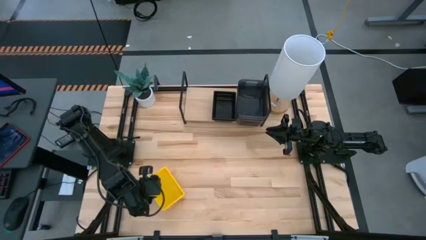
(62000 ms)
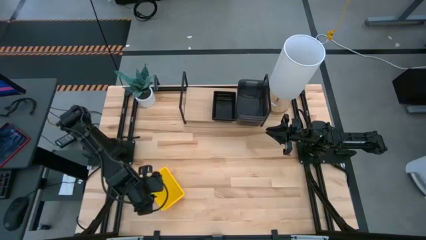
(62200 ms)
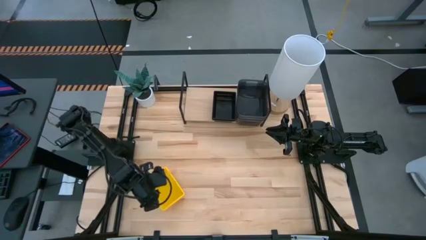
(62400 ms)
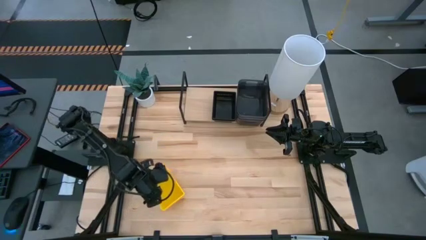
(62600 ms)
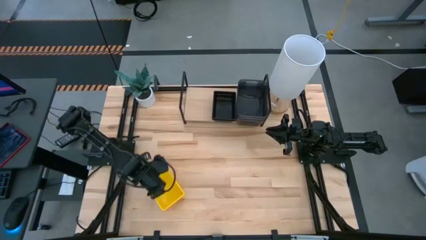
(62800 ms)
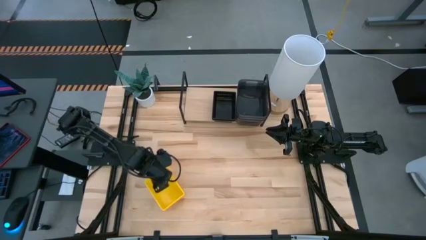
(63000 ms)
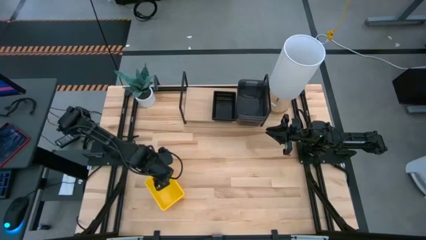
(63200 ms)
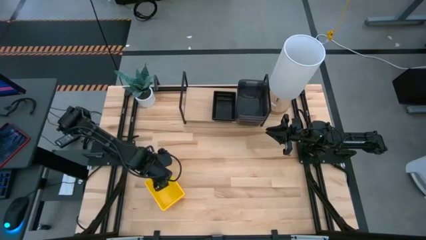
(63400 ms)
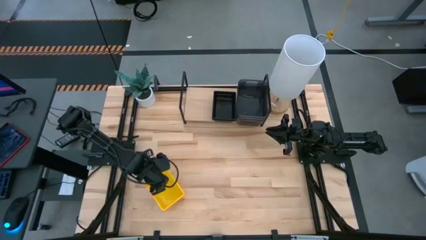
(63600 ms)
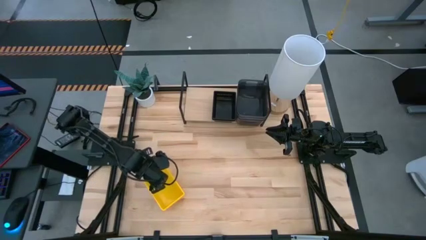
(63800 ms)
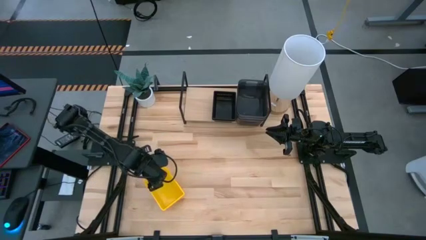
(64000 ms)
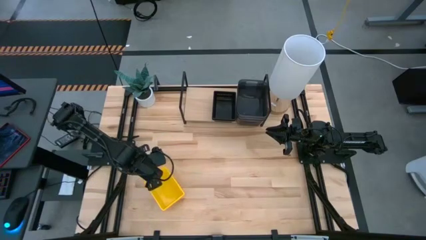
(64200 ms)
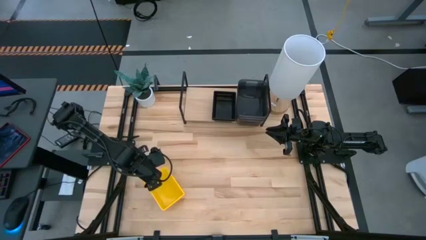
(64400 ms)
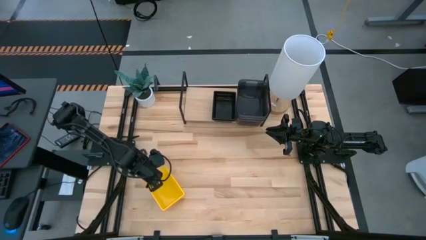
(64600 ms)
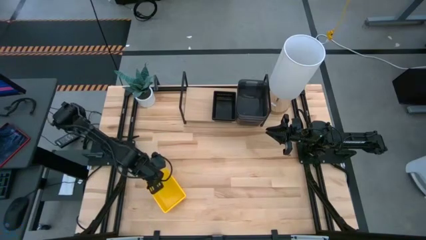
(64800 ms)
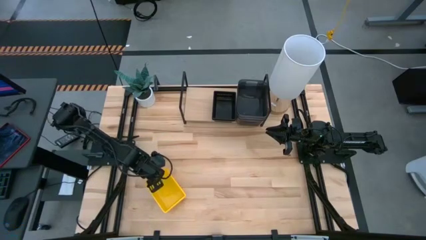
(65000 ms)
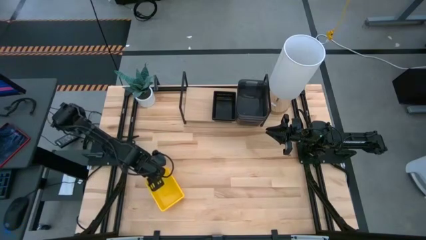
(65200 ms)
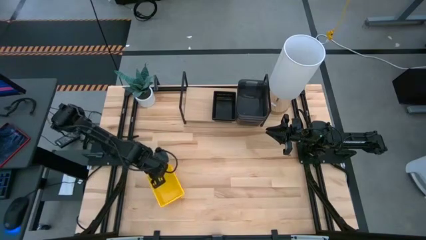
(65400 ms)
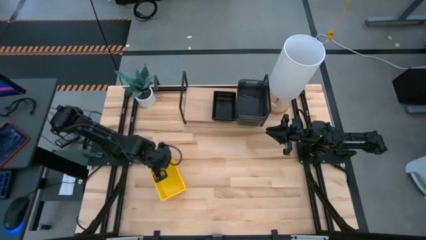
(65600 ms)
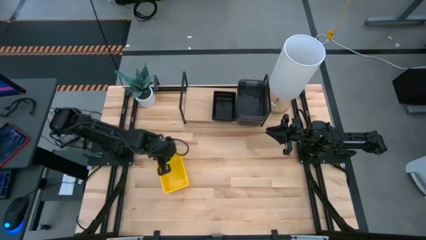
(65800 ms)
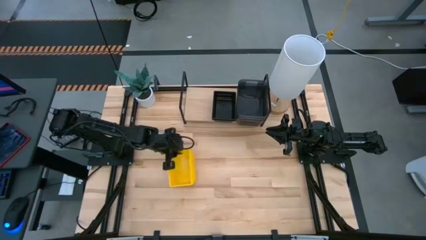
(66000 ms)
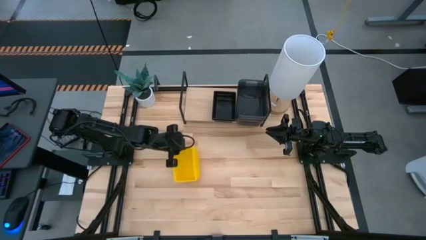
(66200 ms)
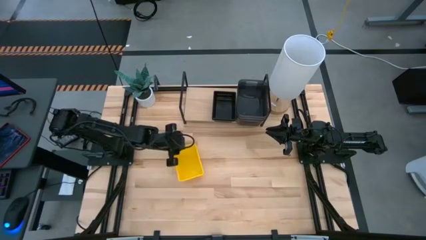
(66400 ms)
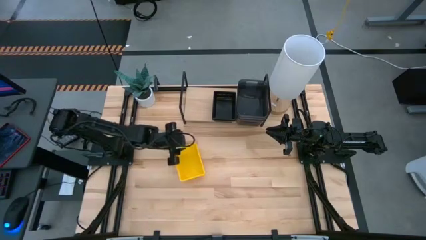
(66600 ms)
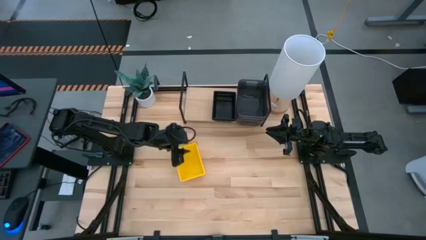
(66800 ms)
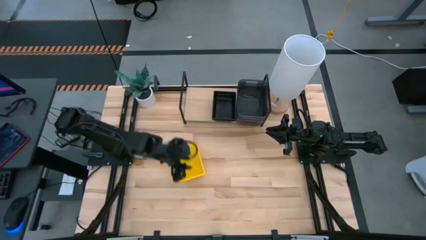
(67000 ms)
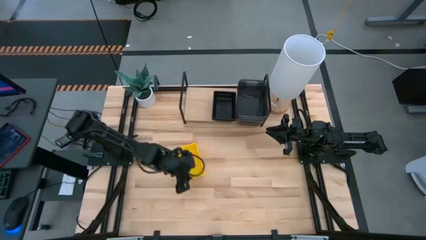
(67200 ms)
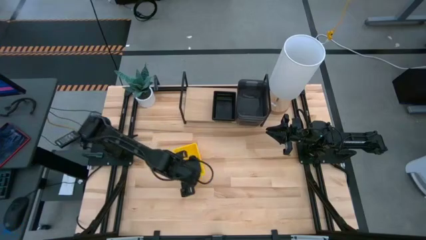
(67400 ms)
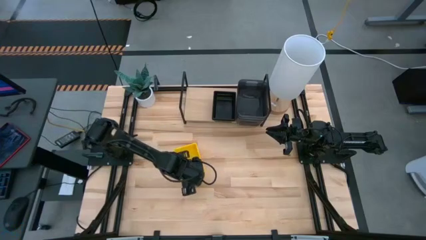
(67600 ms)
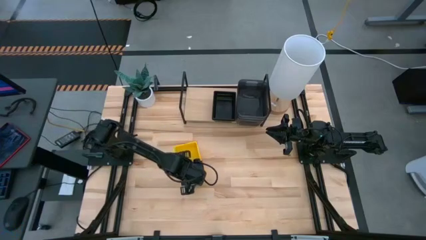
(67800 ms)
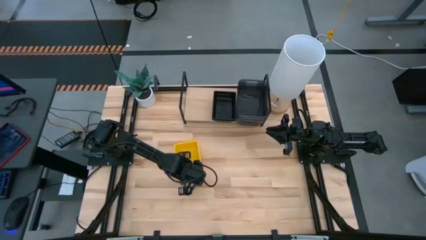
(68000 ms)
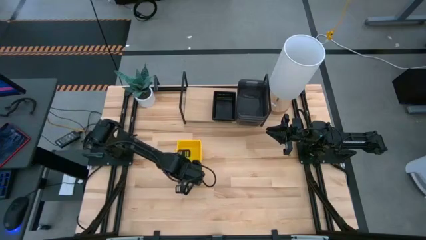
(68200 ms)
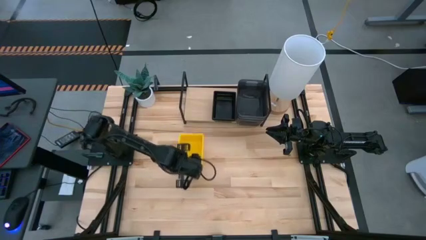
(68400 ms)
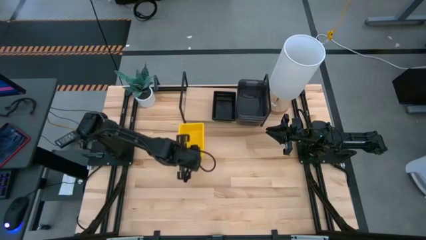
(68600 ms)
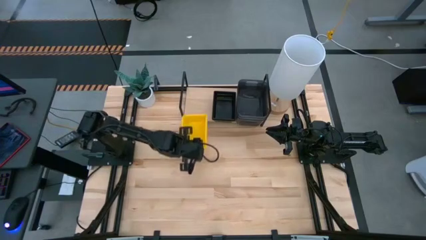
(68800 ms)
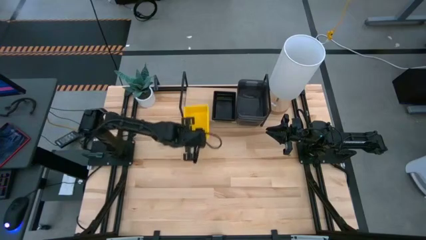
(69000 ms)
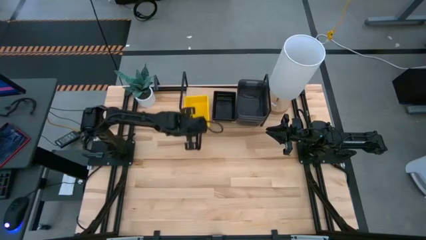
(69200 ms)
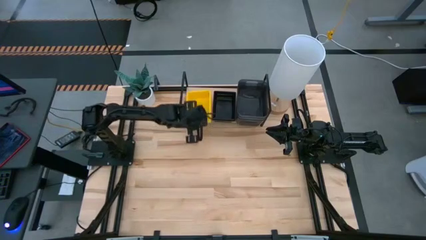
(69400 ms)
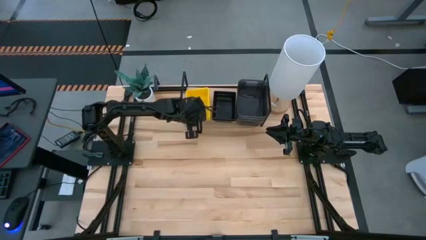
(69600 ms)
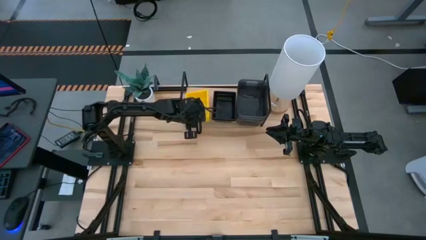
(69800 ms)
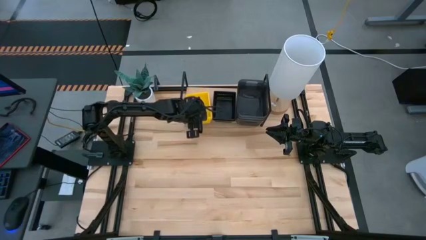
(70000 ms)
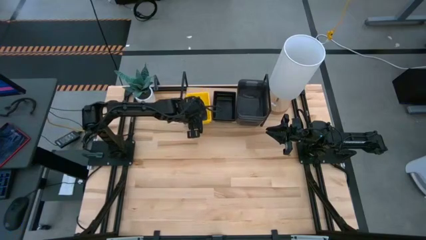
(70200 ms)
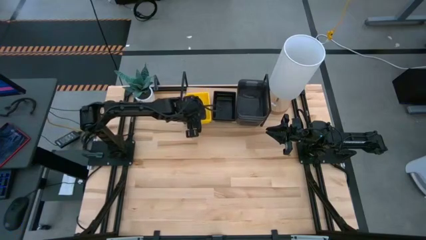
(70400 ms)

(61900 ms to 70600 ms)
Task: Stack baskets on shelf by color
Put the stacked yellow bins on the shelf

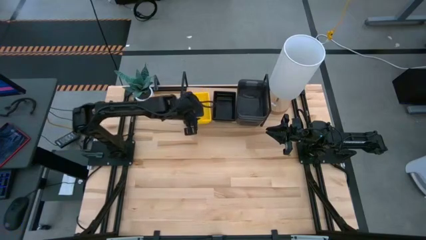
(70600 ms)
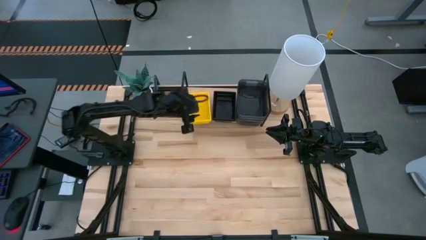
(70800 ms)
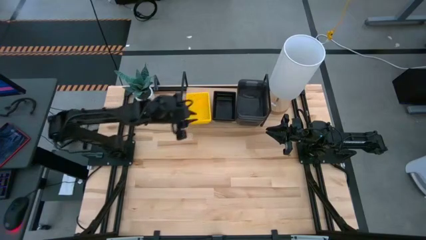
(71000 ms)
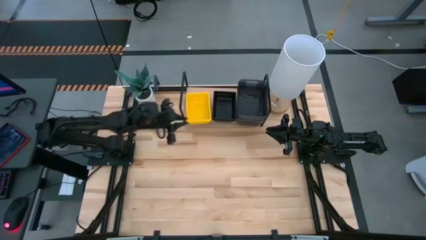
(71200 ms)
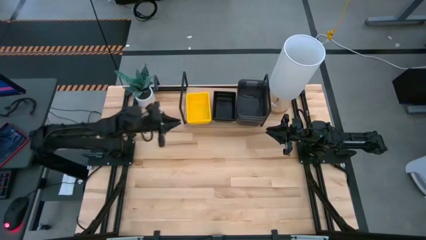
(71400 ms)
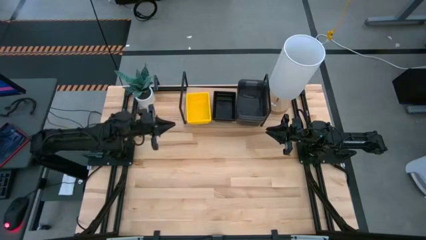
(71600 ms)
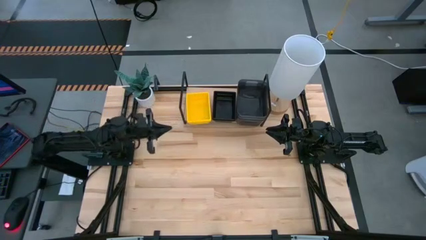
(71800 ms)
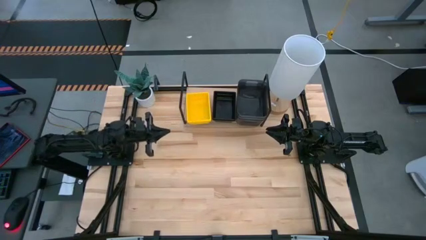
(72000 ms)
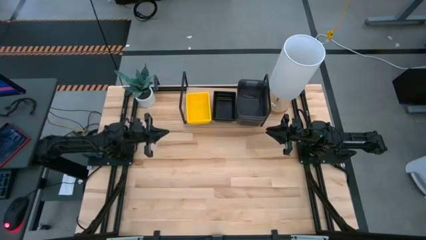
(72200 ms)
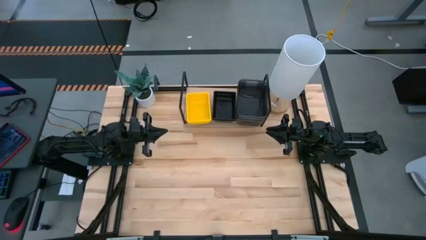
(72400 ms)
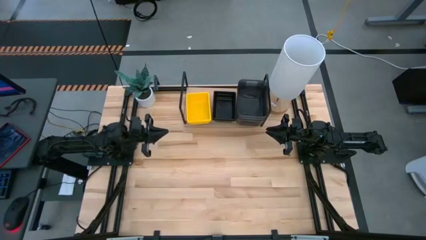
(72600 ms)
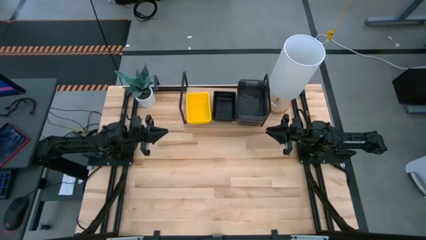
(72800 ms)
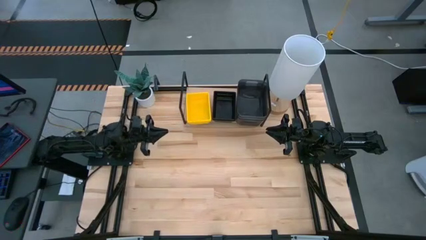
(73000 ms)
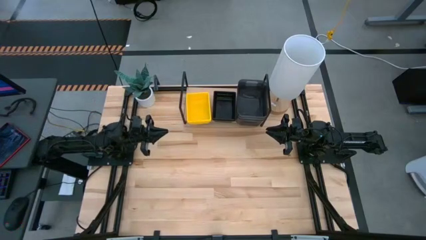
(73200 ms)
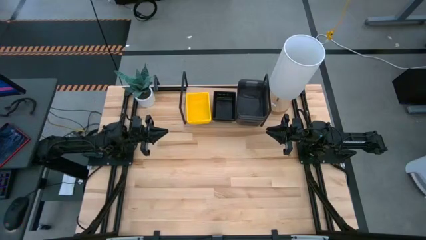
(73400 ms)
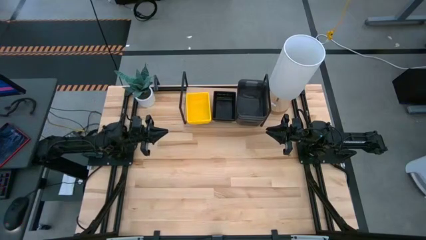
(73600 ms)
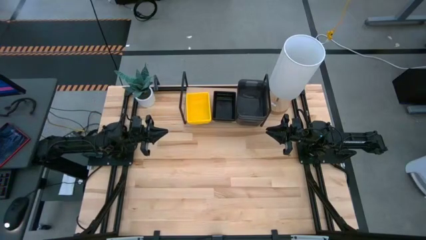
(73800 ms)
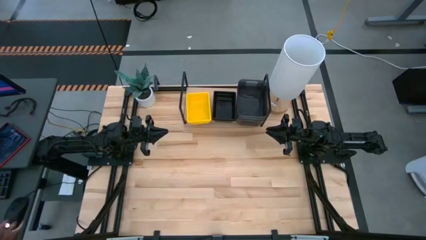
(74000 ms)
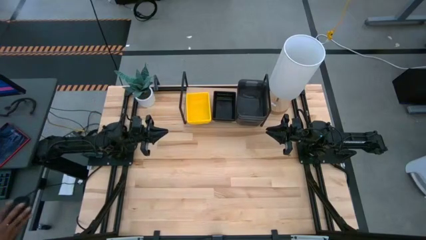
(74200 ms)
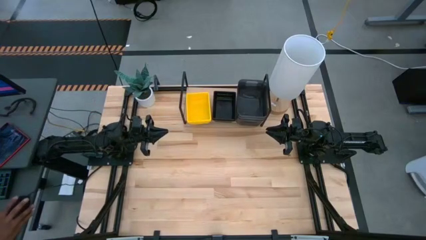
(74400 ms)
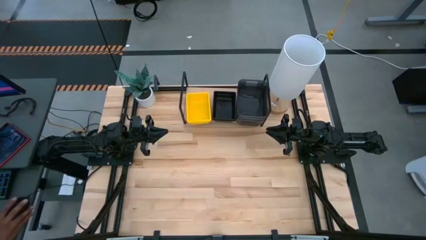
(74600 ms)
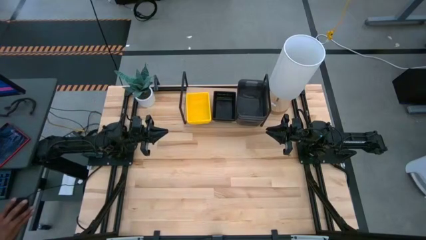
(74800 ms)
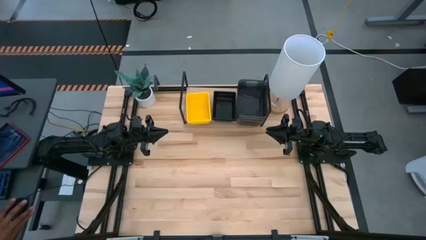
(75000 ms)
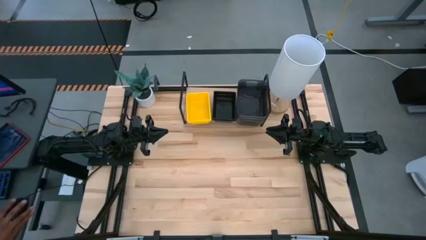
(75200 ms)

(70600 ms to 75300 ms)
Return to Home Position

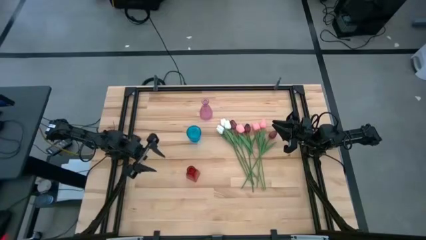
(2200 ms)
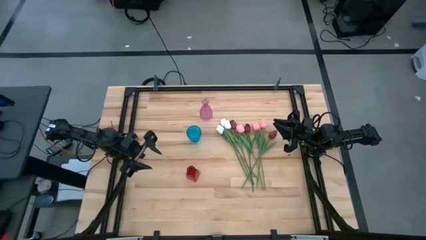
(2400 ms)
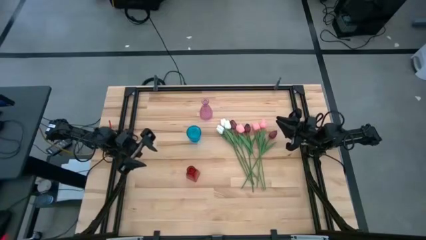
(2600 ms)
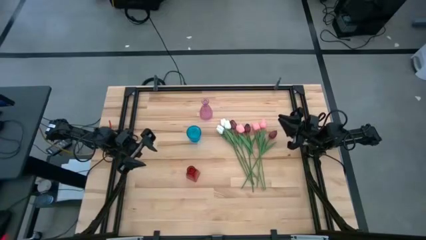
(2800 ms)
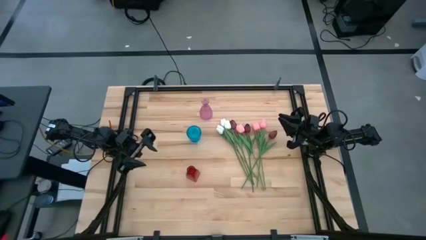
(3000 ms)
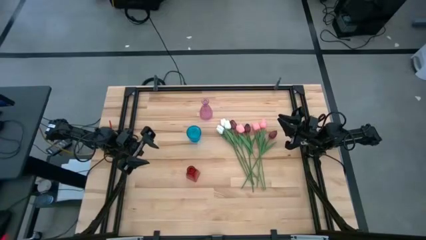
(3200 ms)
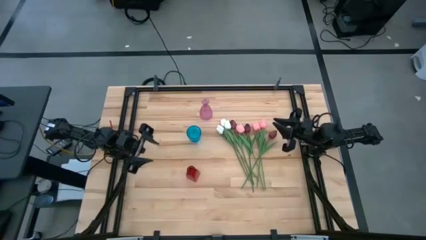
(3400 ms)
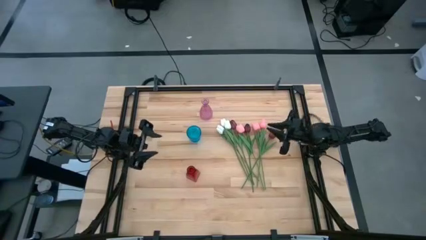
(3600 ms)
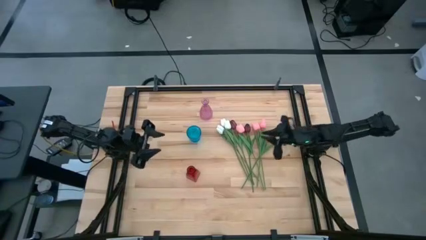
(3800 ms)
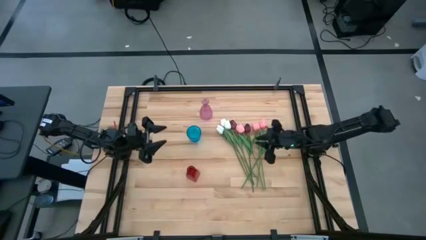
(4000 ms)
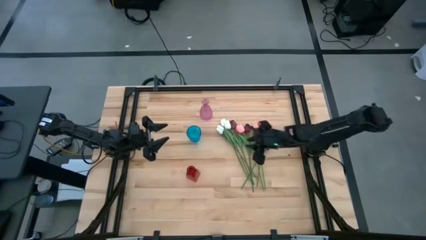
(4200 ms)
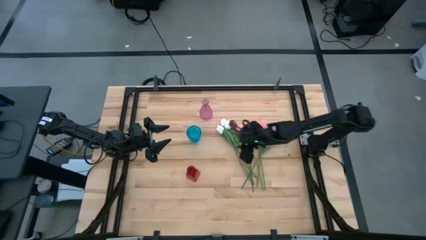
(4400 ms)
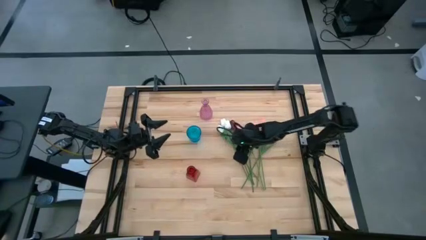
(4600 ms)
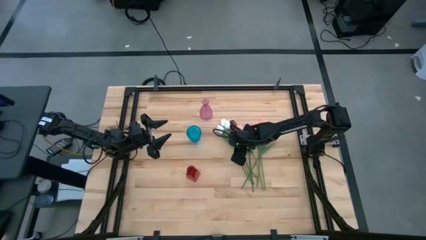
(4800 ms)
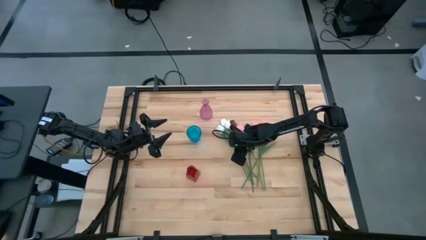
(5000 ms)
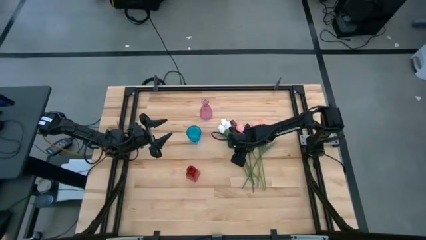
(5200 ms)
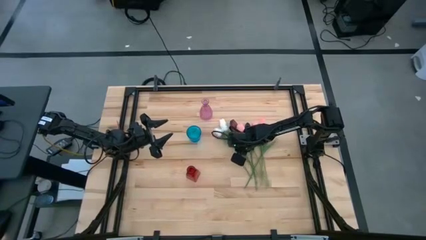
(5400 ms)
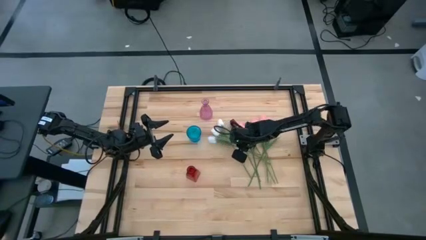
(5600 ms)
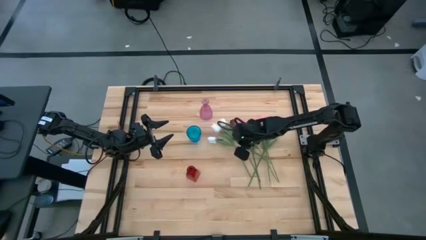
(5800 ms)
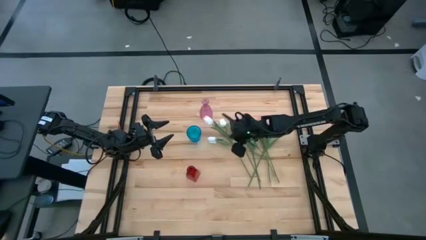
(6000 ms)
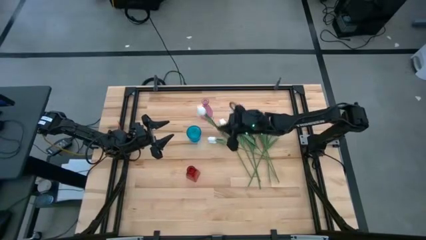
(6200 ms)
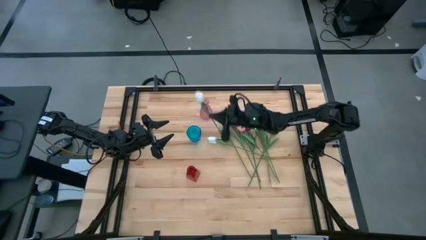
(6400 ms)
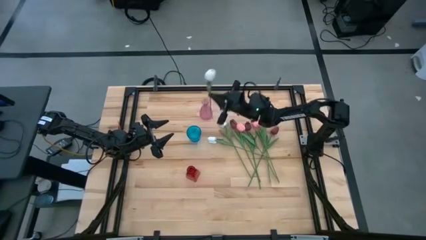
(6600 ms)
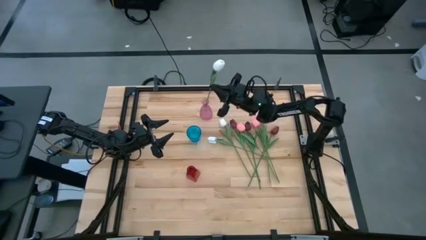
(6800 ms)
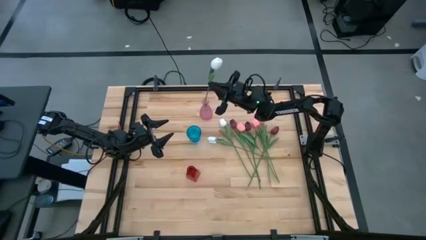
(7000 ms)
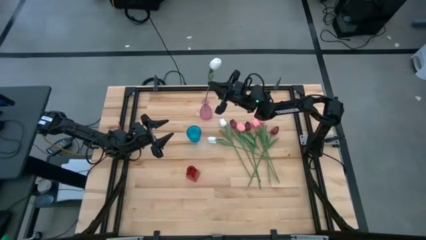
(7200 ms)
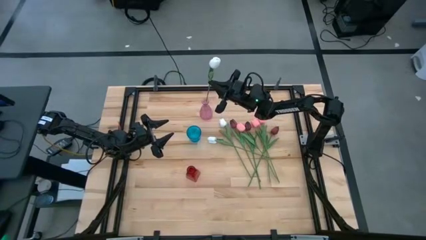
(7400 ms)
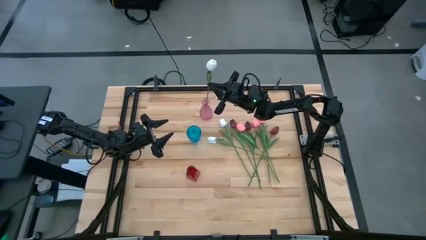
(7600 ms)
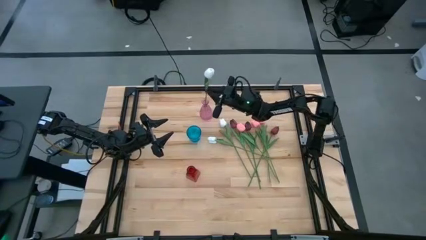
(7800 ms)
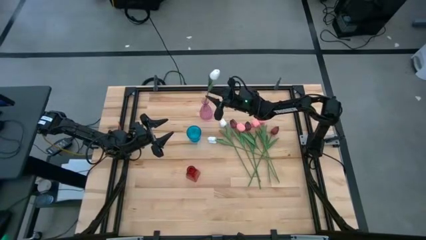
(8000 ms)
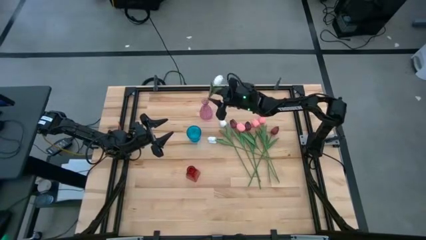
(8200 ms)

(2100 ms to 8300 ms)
Task: Sort flowers into vase by color
Put the middle white flower into the violet vase
